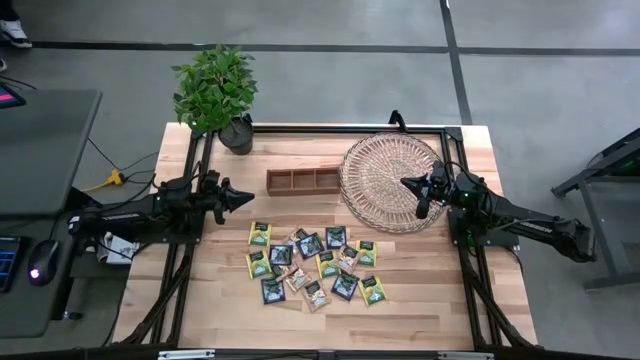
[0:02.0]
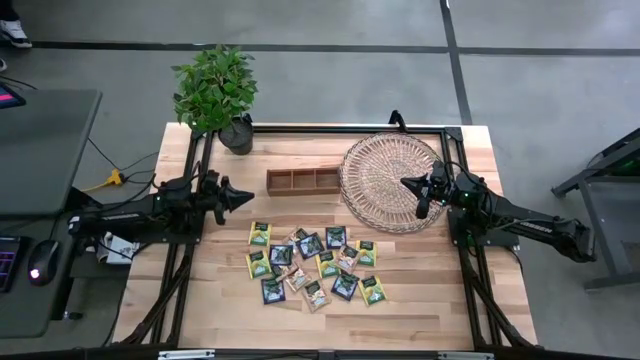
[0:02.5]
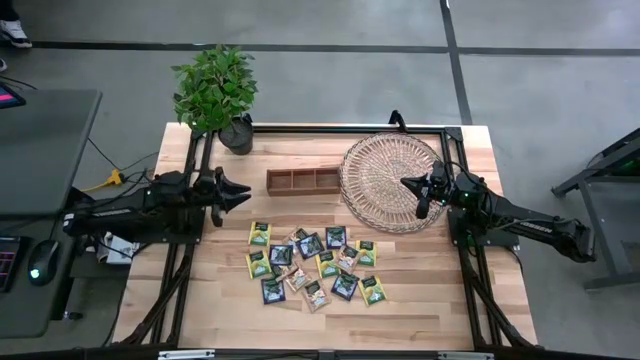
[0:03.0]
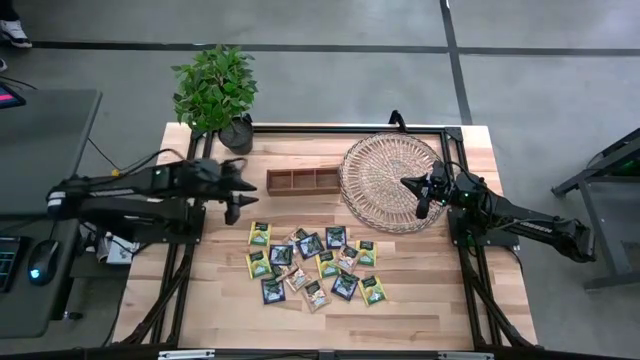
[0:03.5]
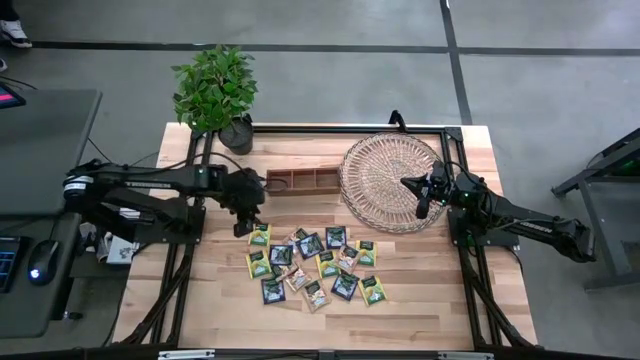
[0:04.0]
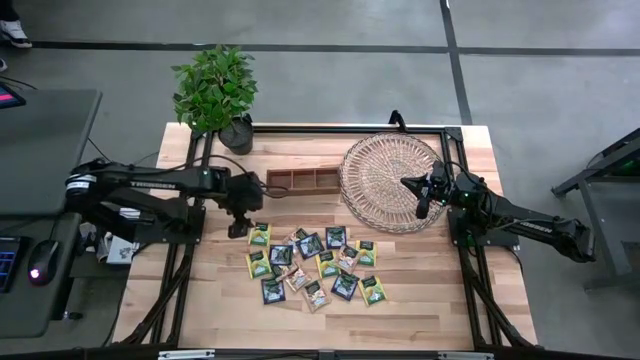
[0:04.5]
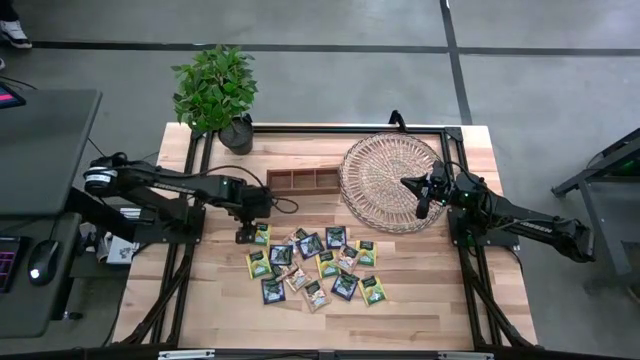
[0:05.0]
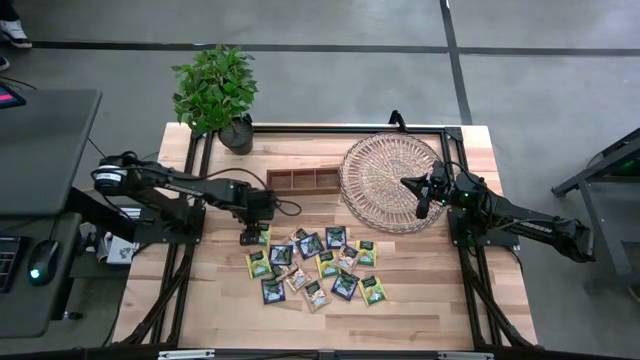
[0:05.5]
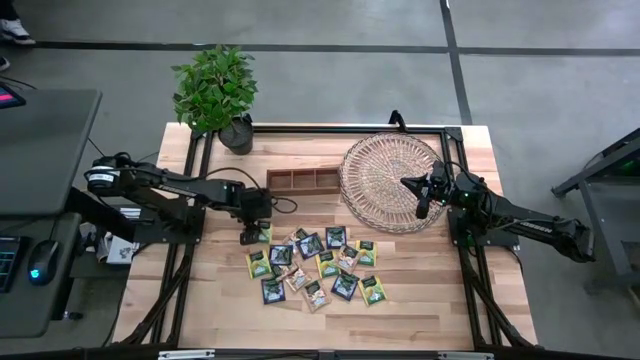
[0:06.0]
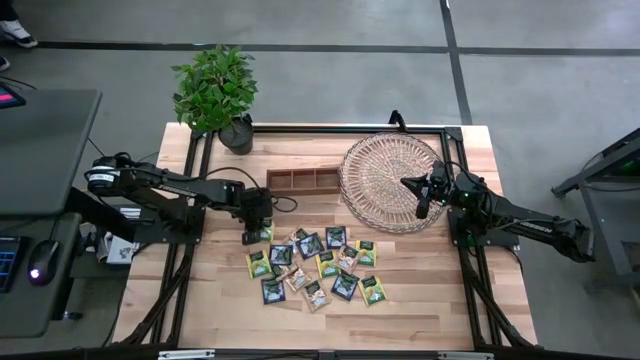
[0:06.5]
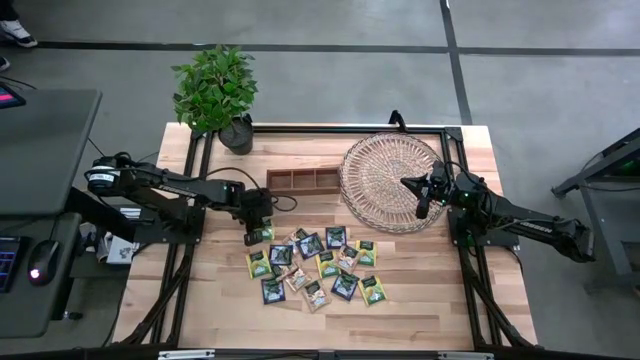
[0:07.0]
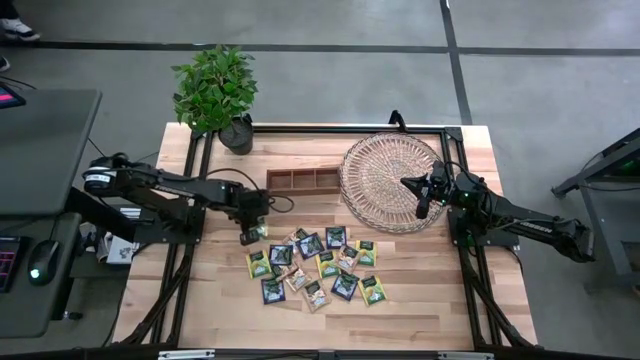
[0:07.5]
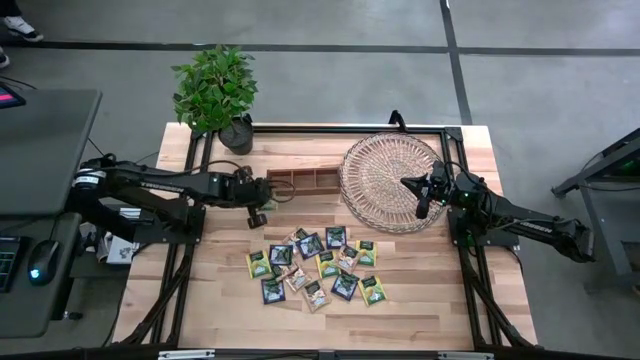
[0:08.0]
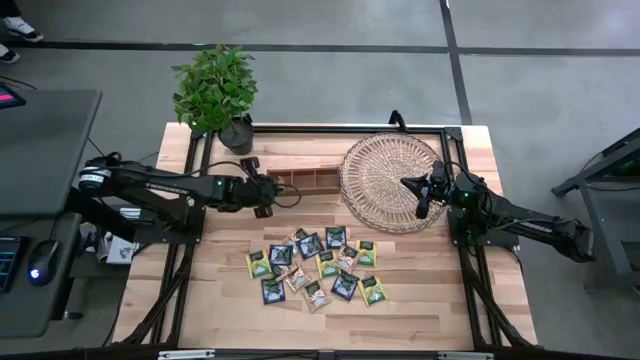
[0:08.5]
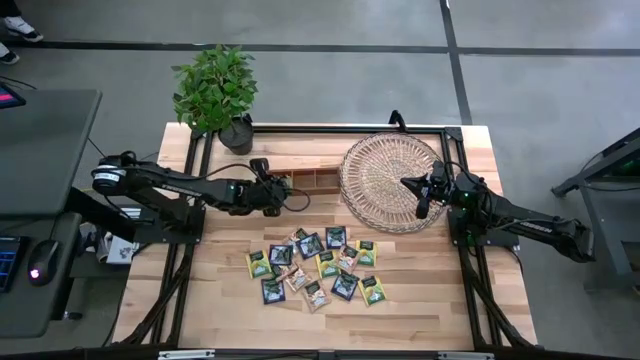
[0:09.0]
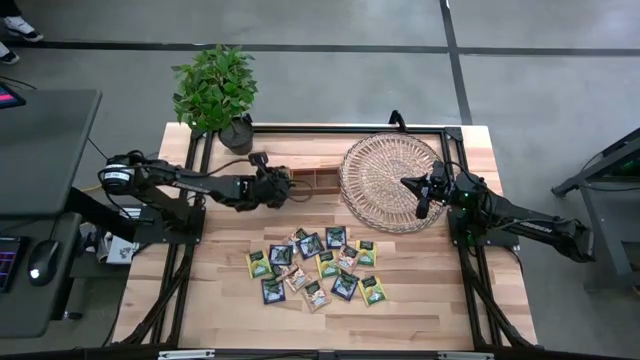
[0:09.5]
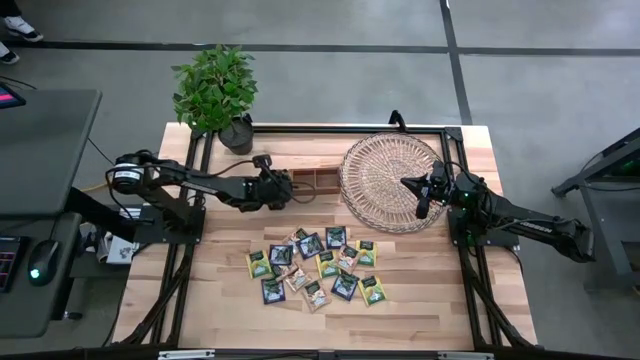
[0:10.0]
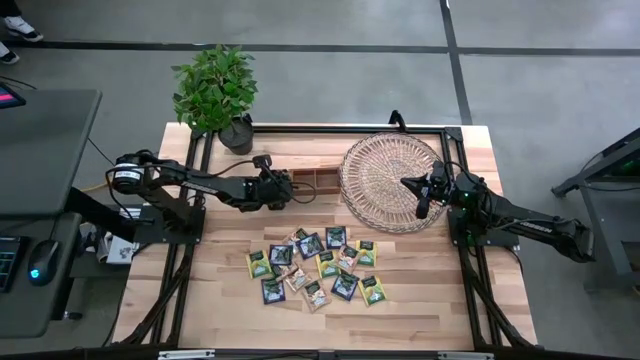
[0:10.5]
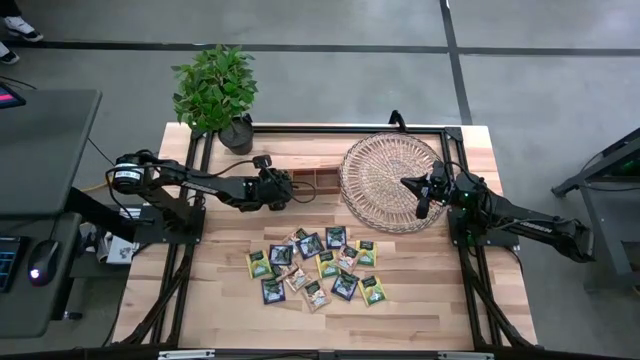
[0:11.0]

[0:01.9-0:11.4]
Task: Pick & Place Tea
Put the yellow tea bag into the left section of the wooden organizer

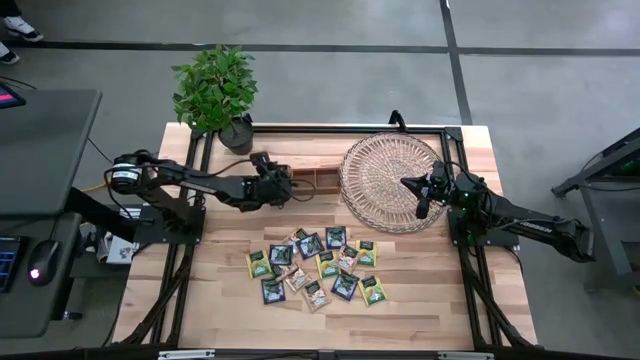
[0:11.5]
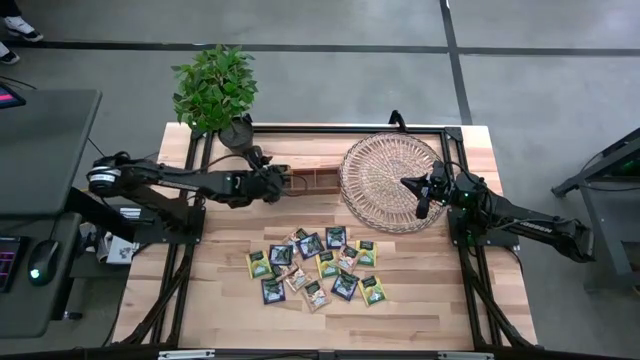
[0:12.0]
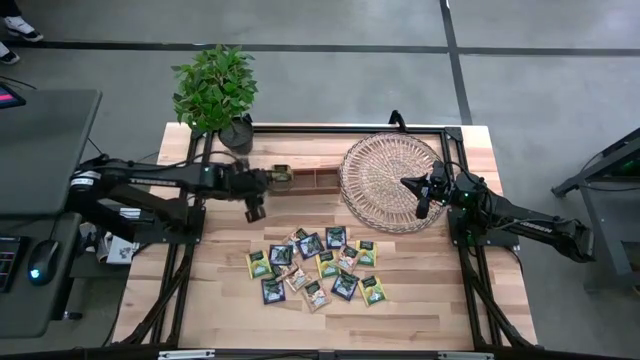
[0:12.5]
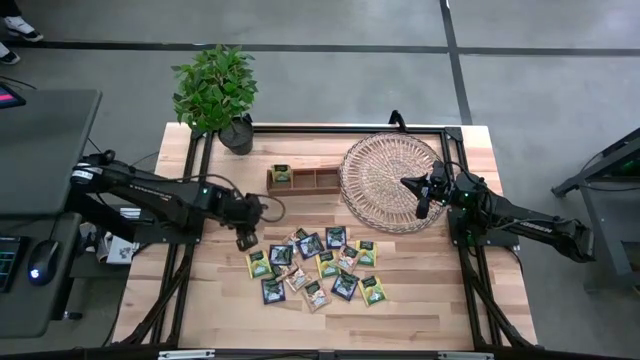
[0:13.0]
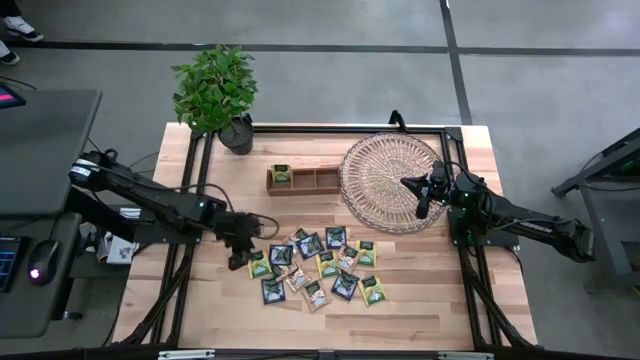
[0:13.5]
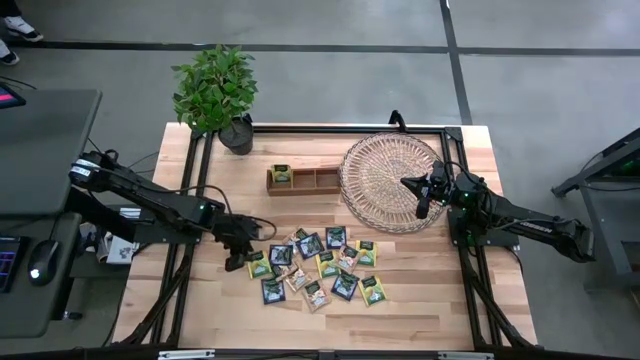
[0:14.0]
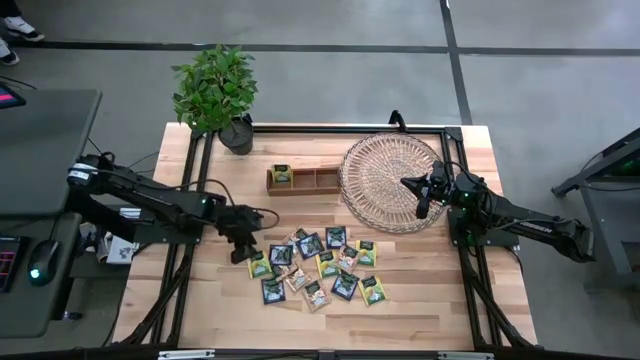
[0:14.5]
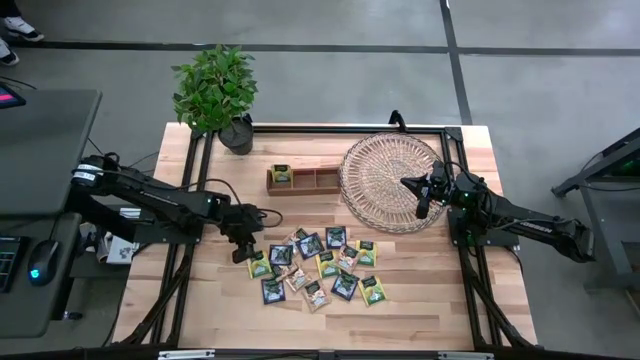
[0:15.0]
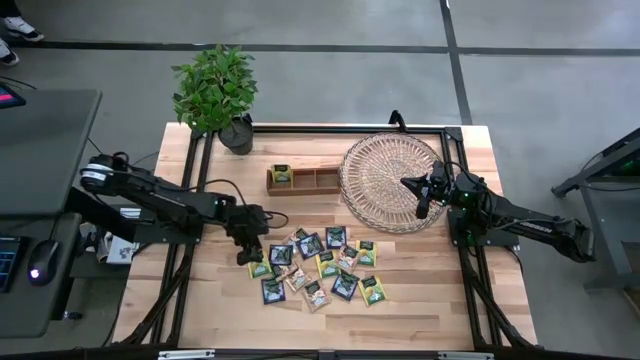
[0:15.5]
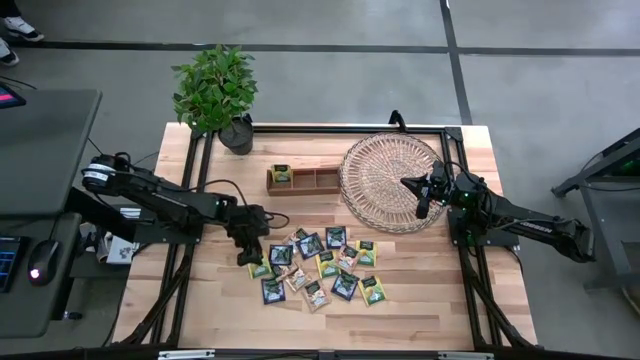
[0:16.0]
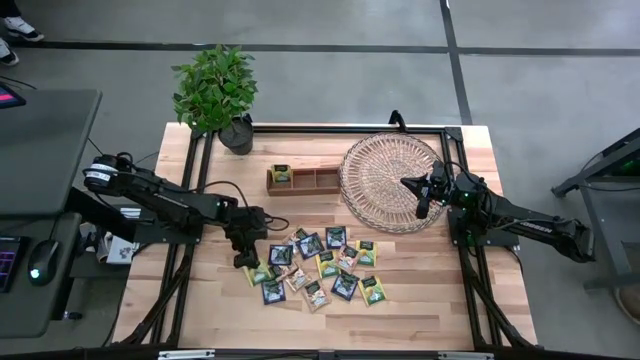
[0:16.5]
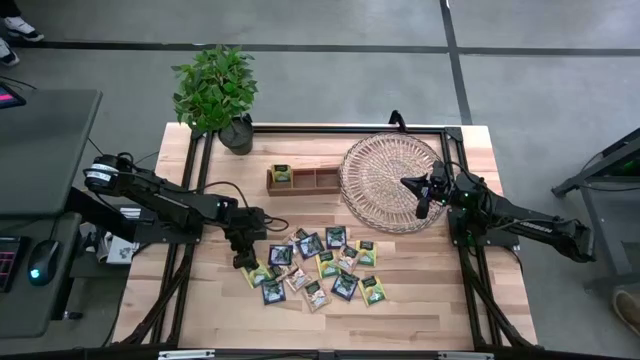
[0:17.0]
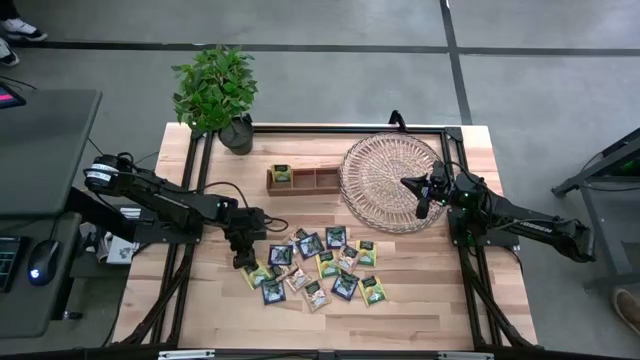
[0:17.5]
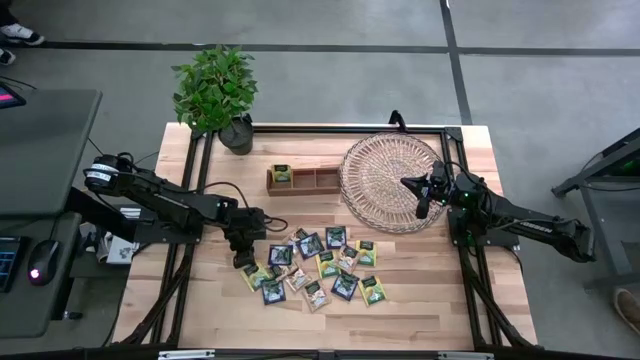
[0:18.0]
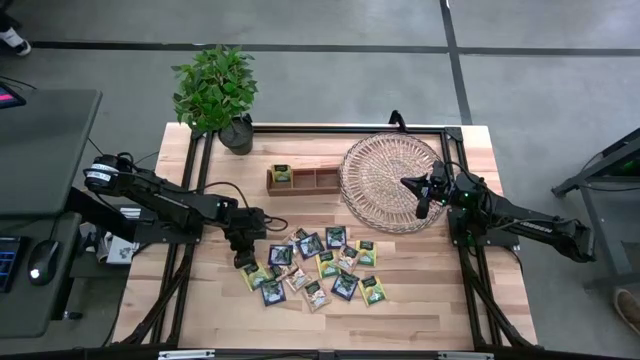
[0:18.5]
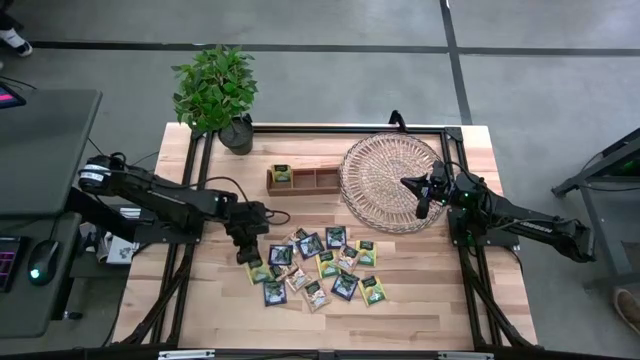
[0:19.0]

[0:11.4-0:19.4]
Put the yellow tea bag into the left section of the wooden organizer

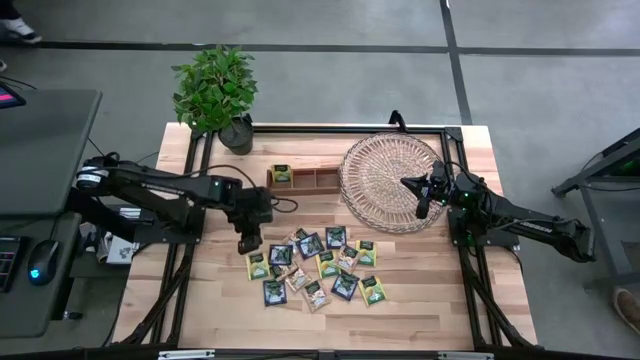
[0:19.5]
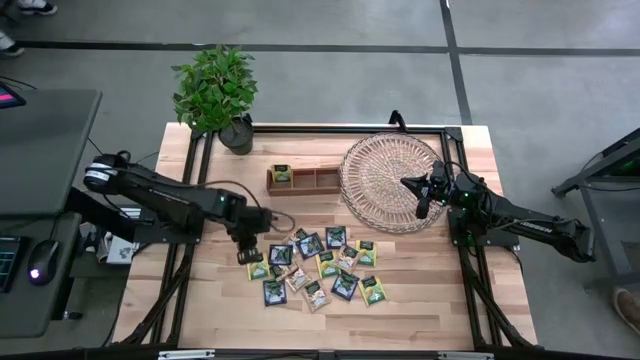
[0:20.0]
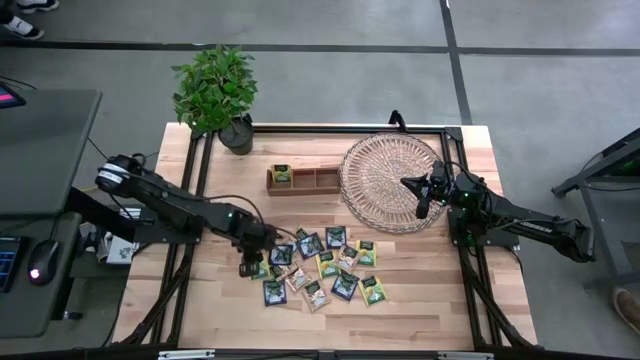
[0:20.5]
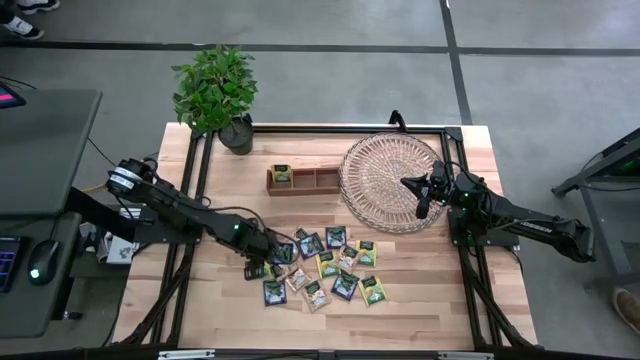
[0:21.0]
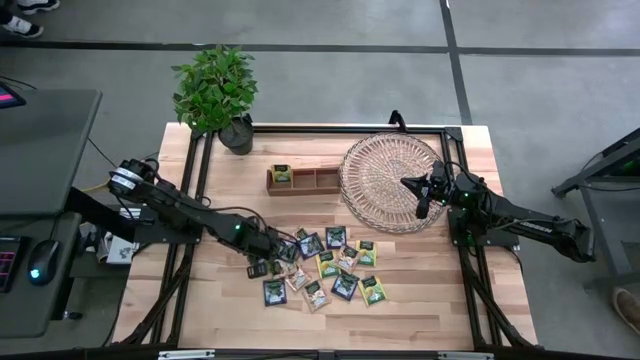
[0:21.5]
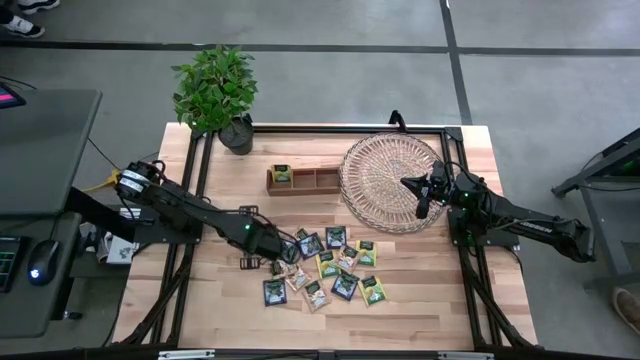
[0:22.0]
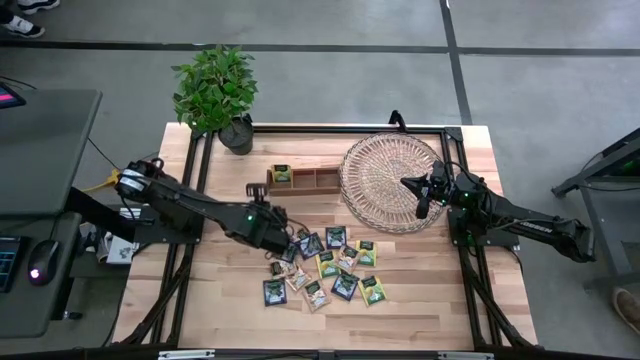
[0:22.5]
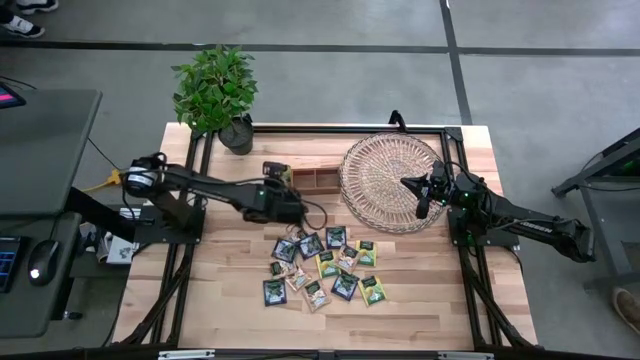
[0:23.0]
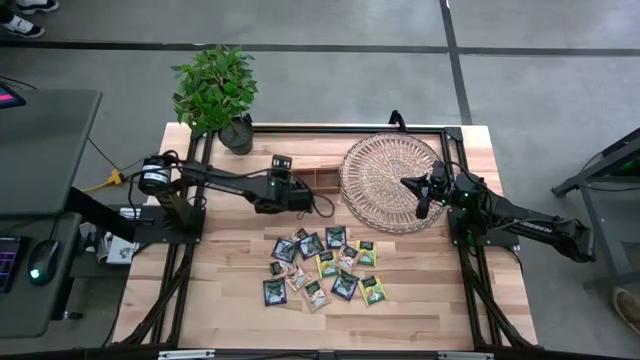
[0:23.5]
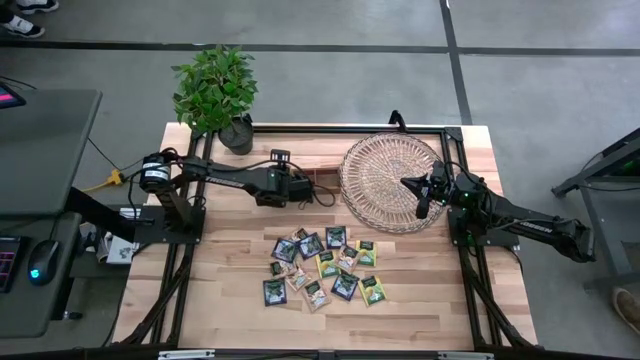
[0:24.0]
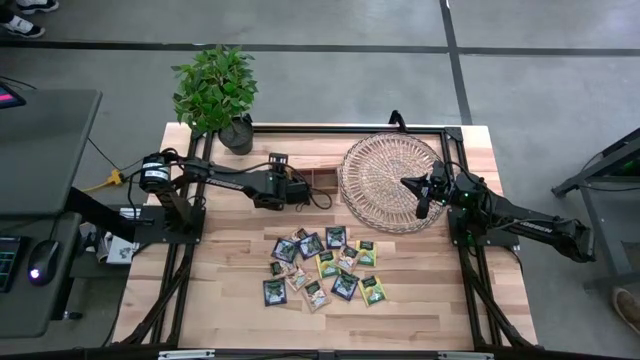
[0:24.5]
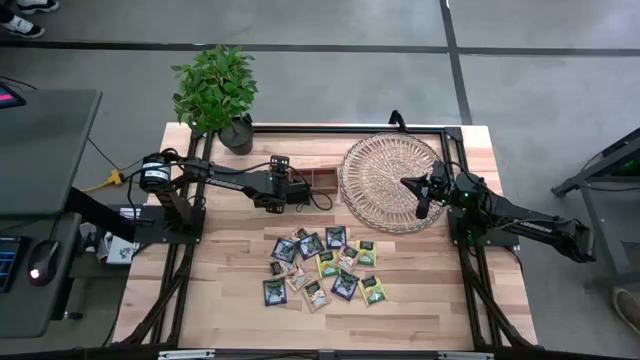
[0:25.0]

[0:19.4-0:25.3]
Put the yellow tea bag into the left section of the wooden organizer
